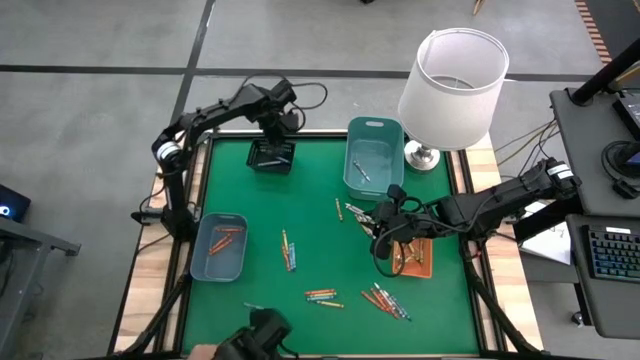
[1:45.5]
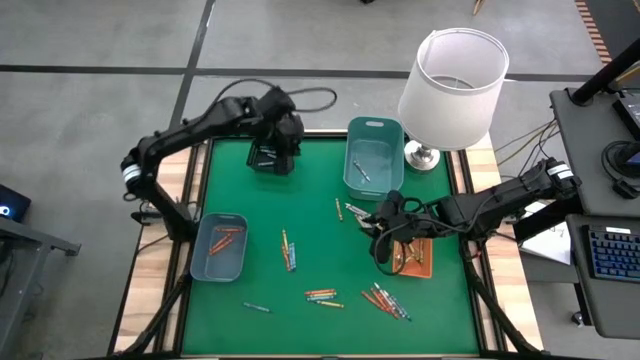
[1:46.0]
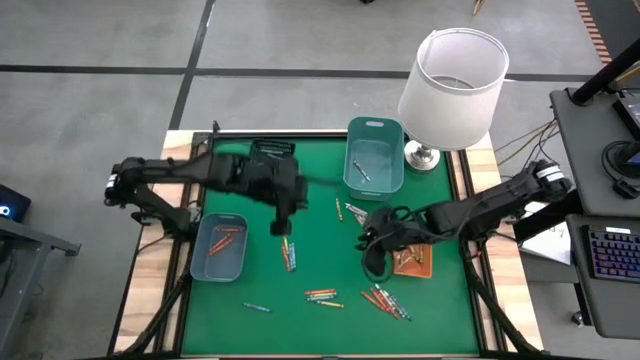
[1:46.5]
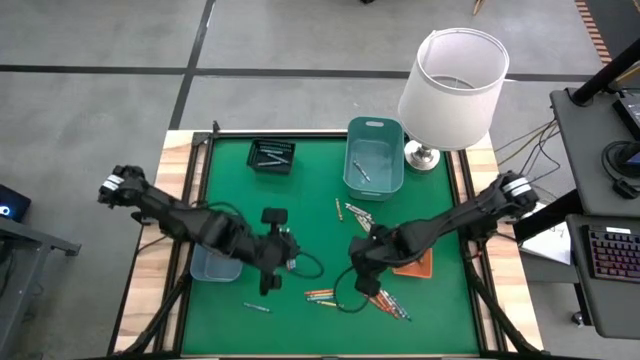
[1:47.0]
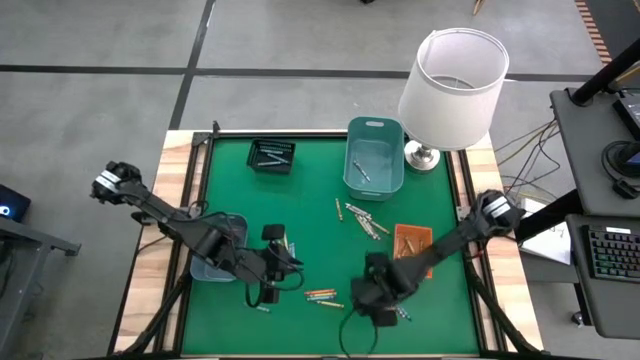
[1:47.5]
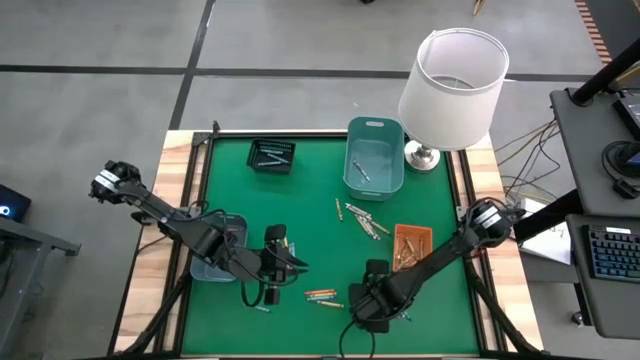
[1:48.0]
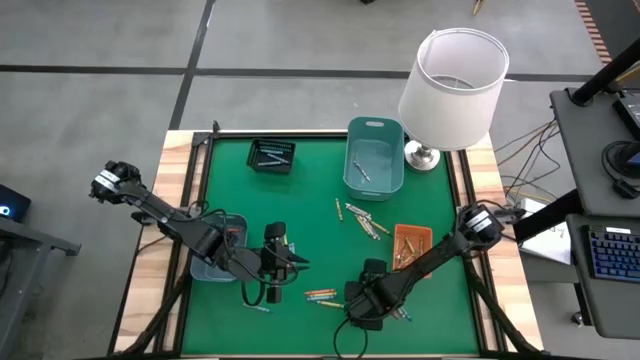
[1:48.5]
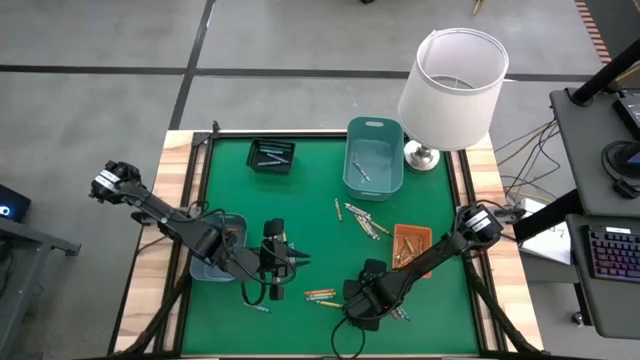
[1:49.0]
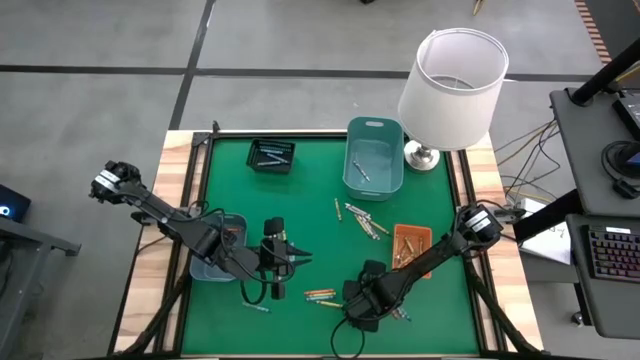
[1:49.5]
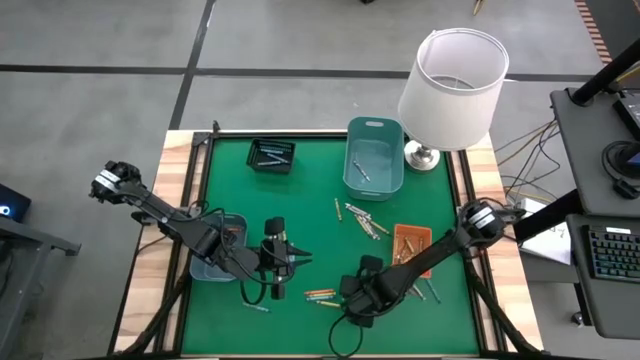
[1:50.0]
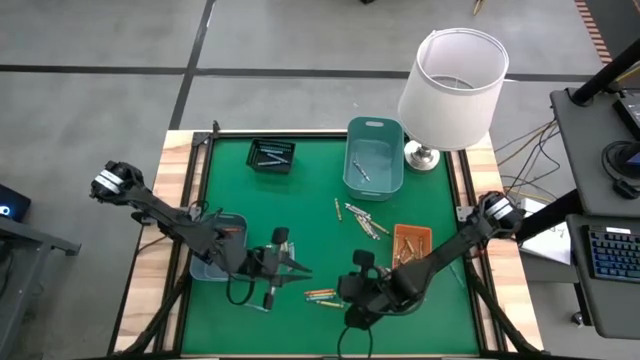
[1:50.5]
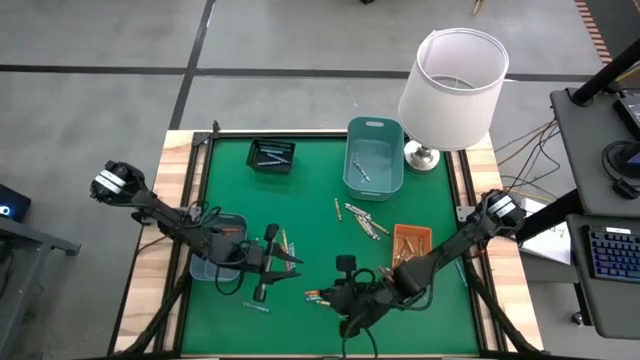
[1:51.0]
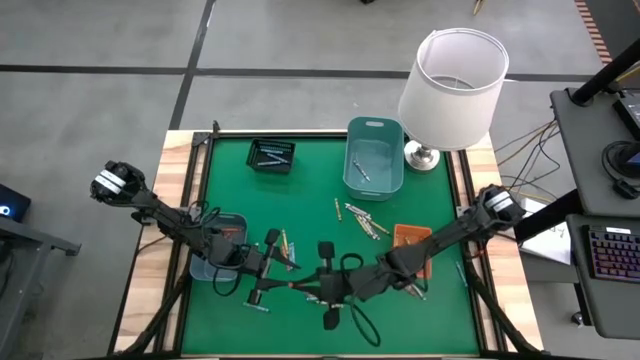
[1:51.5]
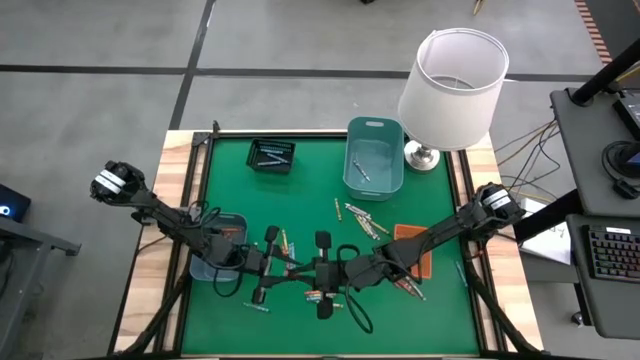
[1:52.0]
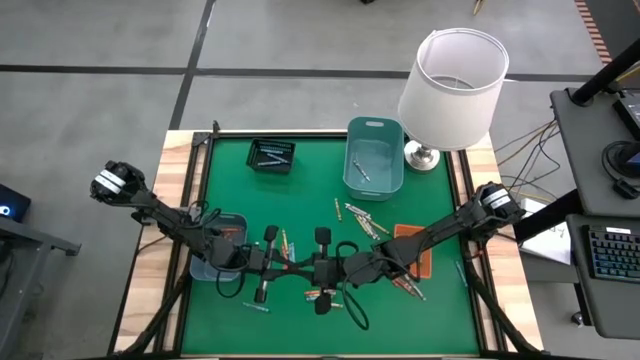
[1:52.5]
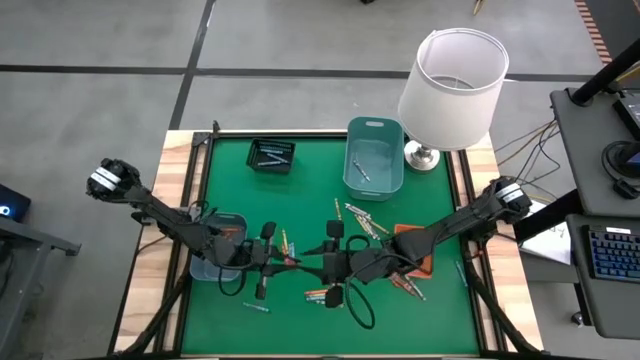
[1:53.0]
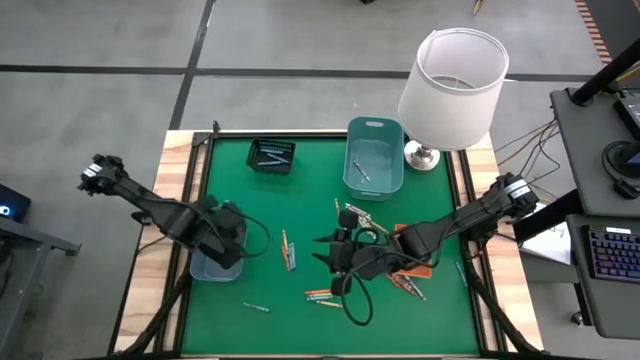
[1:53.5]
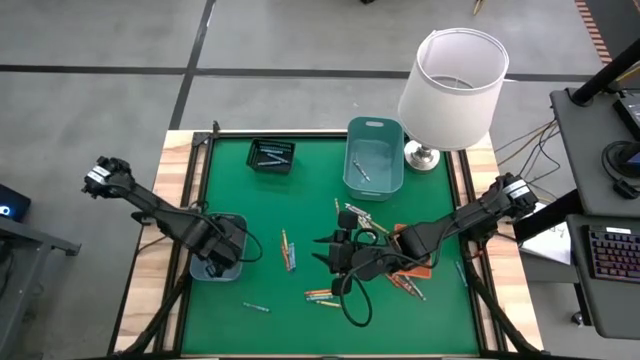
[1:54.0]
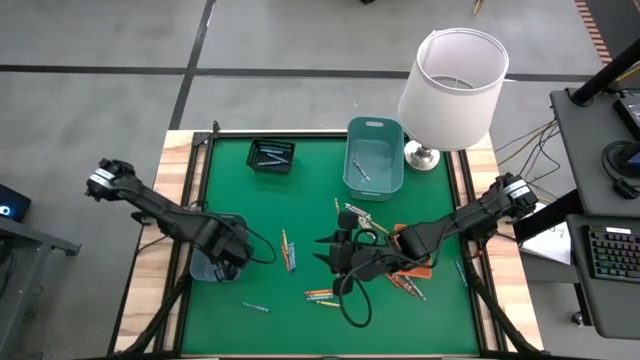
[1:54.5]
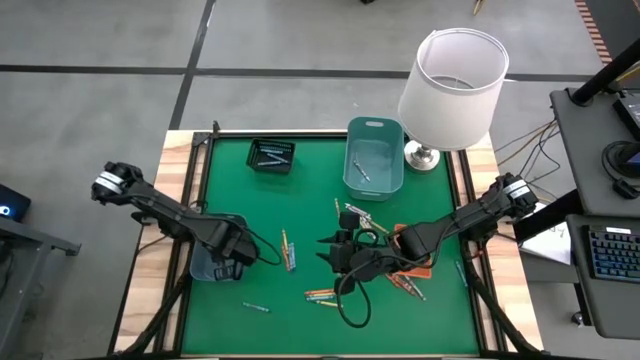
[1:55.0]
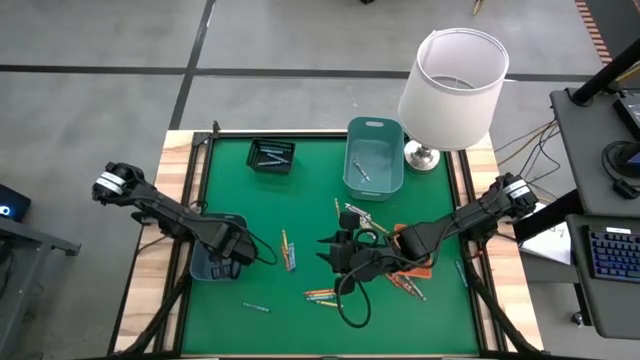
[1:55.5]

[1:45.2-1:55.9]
Task: Sort crayons
Put the orange crayon into the blue bin

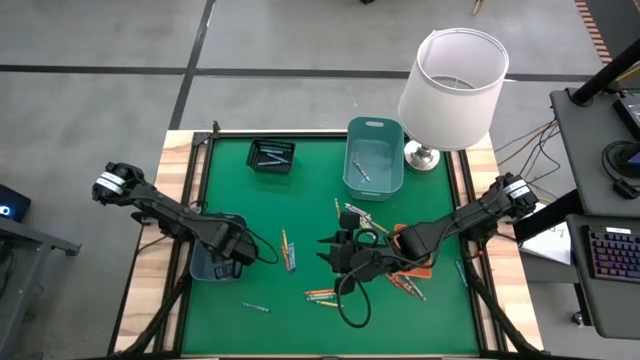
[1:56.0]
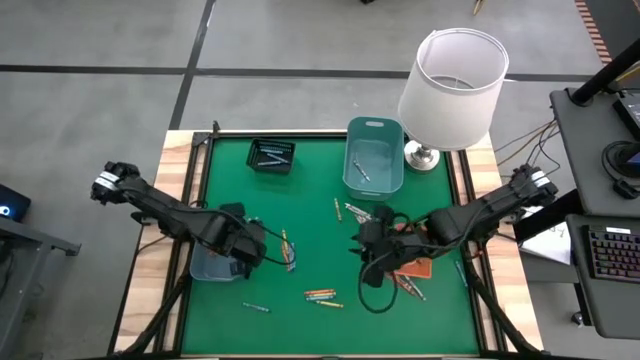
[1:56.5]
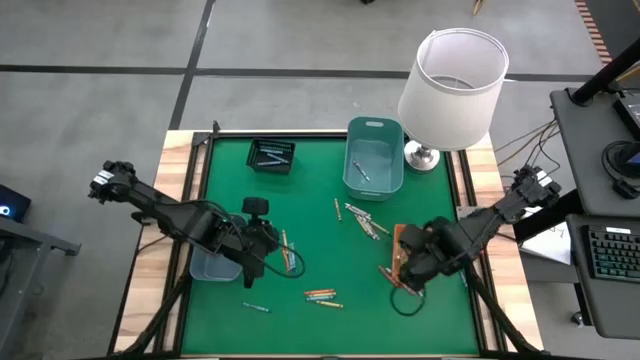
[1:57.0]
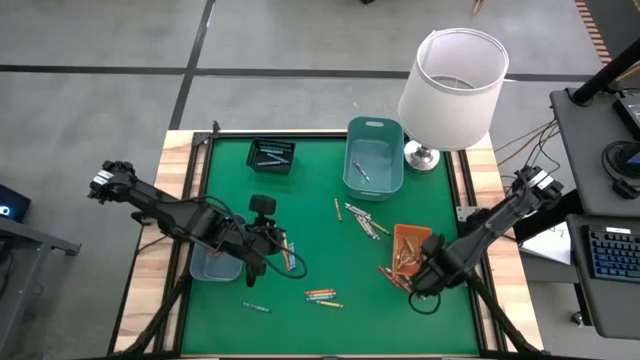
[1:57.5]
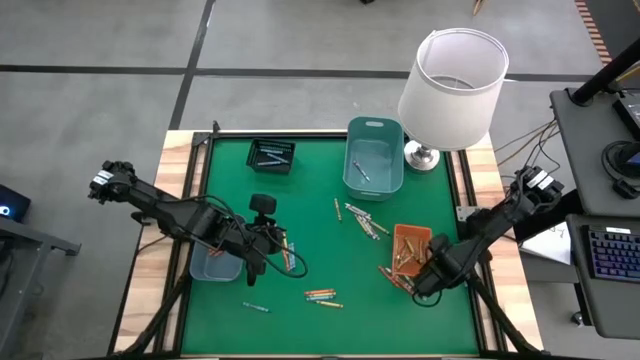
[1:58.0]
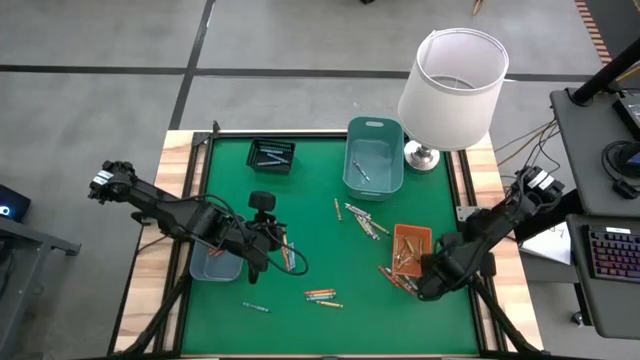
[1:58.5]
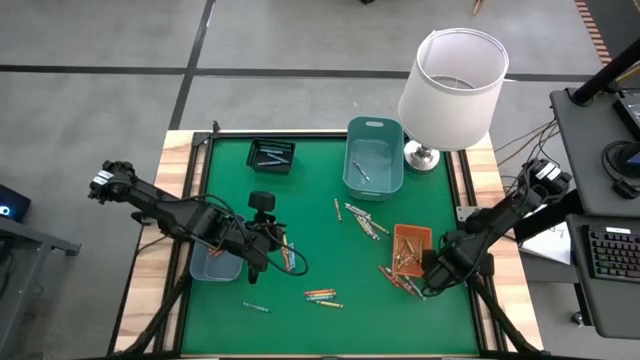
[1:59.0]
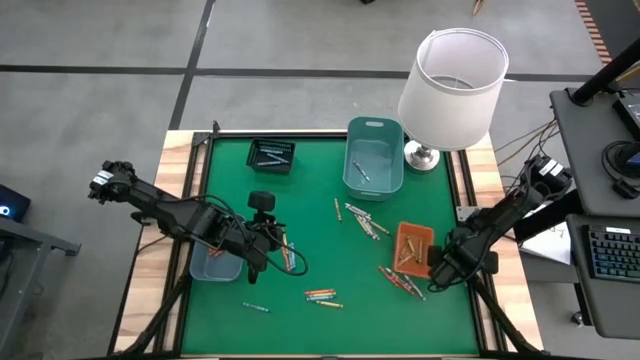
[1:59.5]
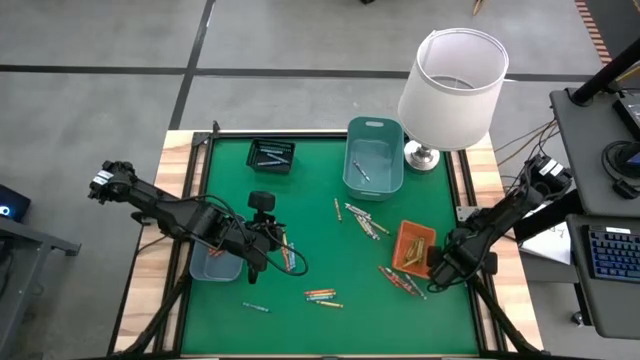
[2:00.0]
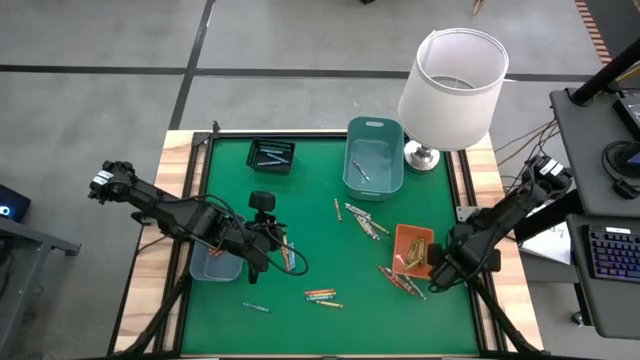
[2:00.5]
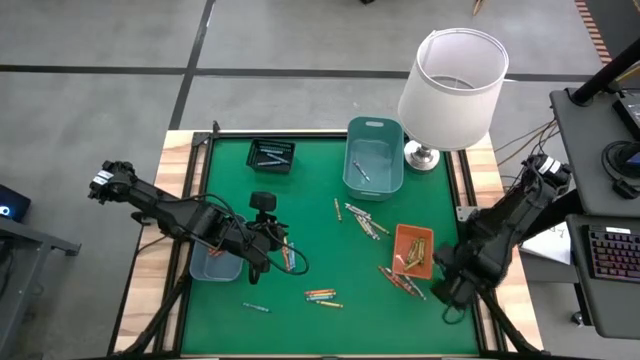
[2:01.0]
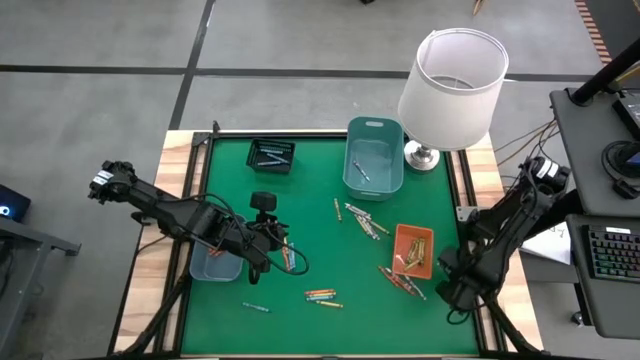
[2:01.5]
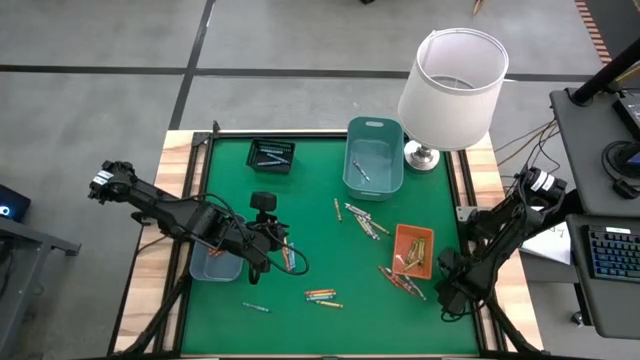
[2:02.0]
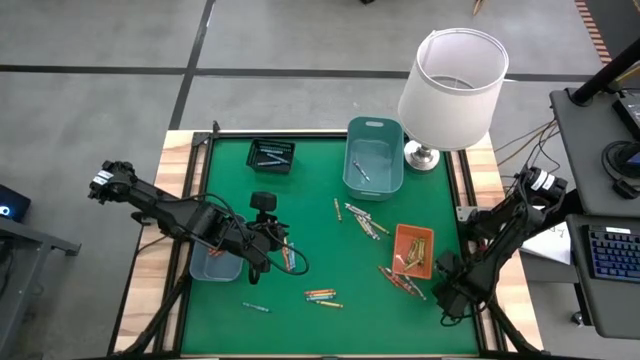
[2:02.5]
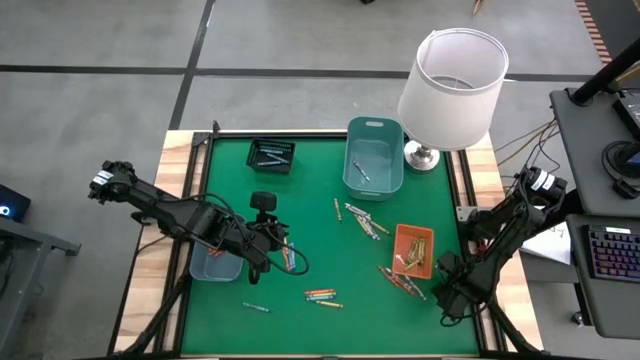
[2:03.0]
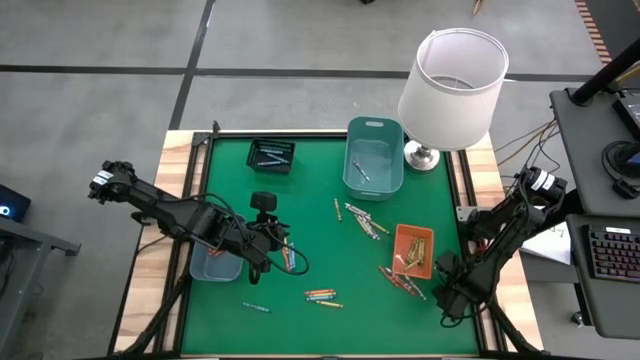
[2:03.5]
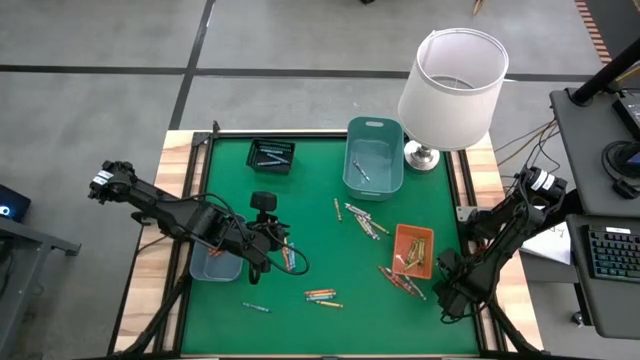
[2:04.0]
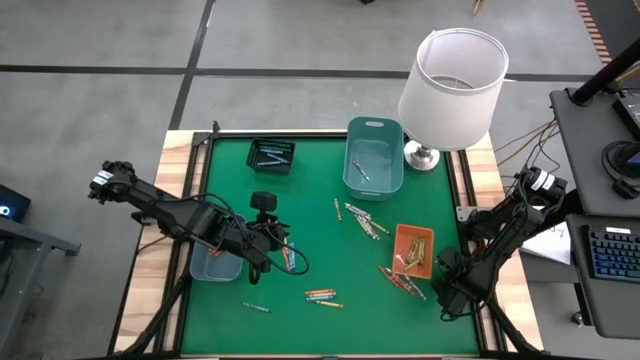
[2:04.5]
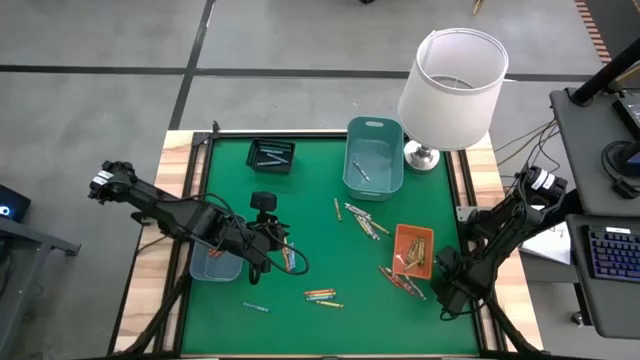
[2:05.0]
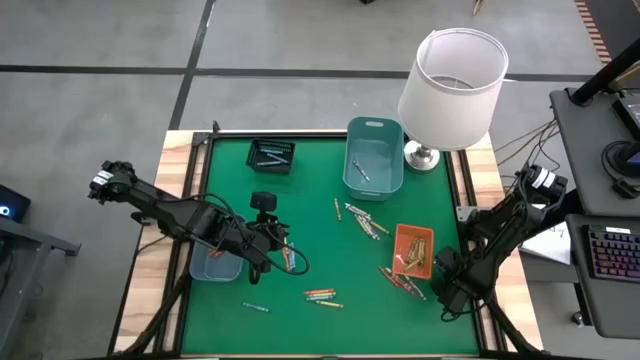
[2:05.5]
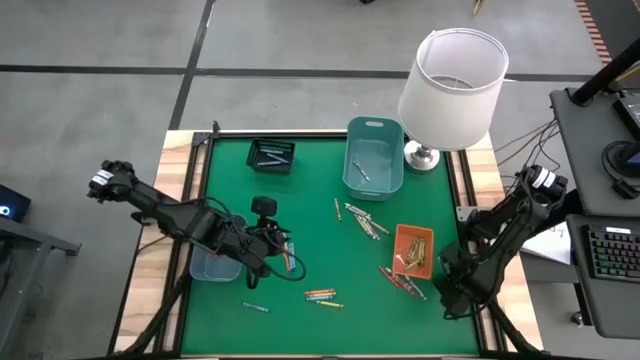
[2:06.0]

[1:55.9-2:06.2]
Put the blue crayon into the black bin
